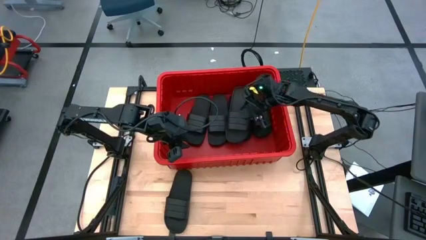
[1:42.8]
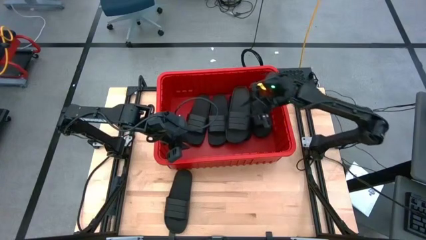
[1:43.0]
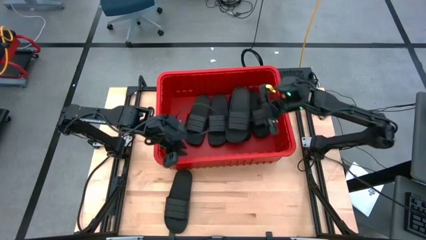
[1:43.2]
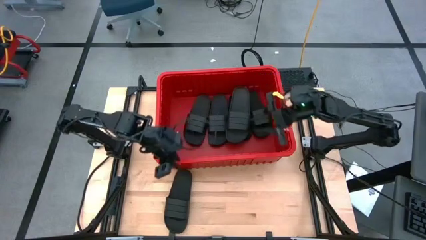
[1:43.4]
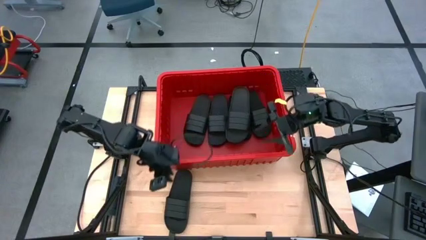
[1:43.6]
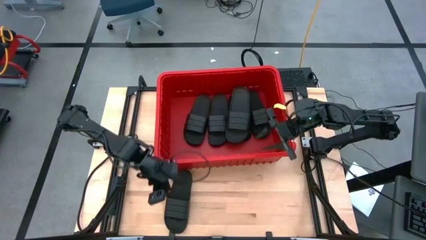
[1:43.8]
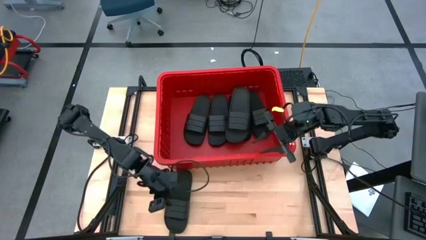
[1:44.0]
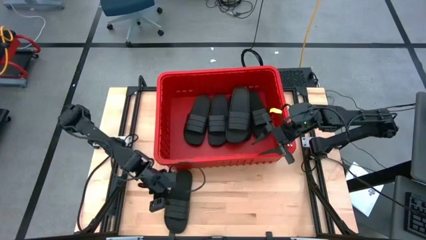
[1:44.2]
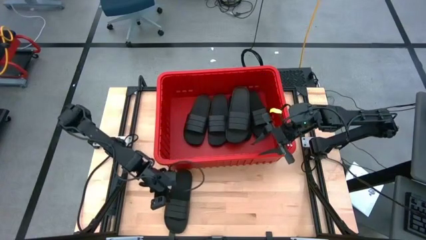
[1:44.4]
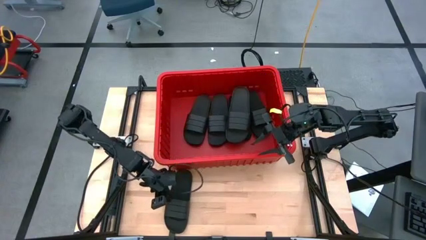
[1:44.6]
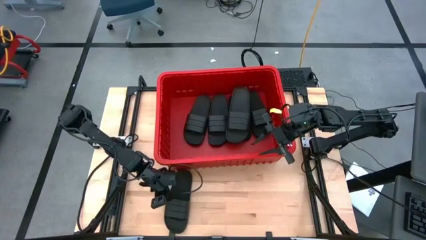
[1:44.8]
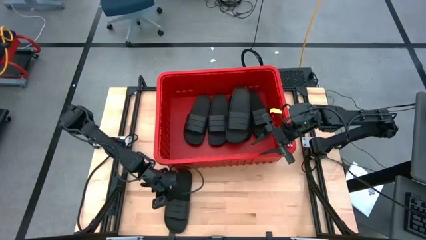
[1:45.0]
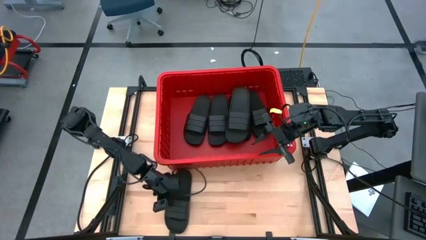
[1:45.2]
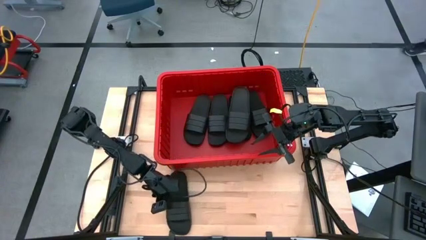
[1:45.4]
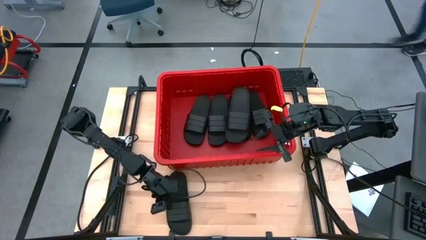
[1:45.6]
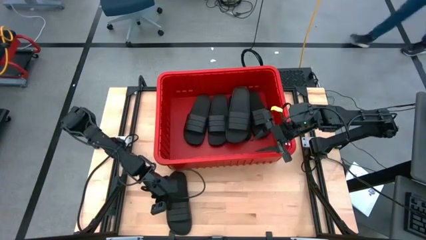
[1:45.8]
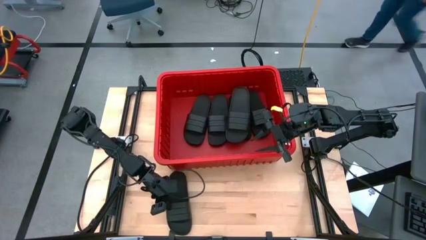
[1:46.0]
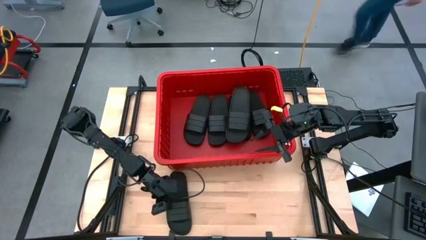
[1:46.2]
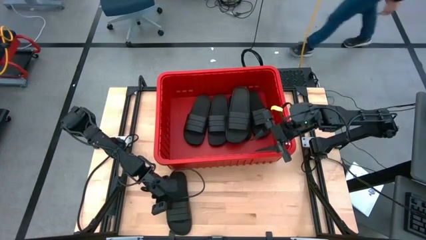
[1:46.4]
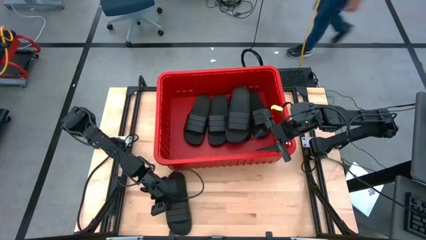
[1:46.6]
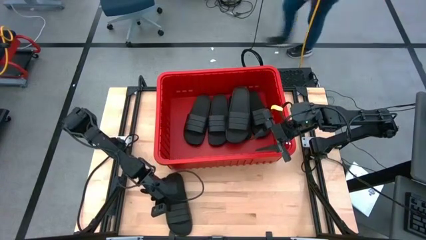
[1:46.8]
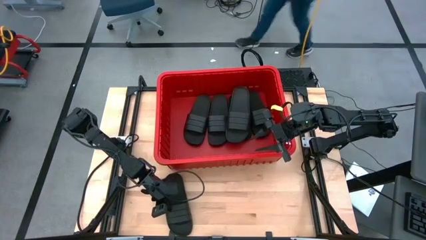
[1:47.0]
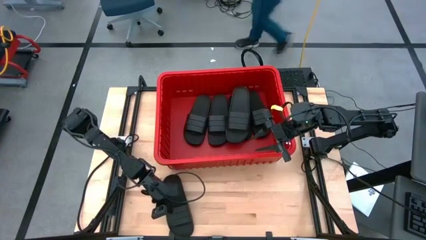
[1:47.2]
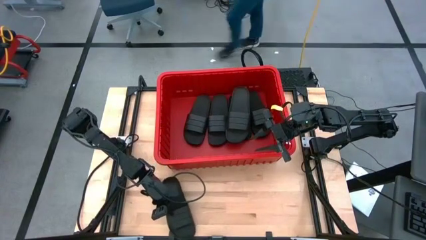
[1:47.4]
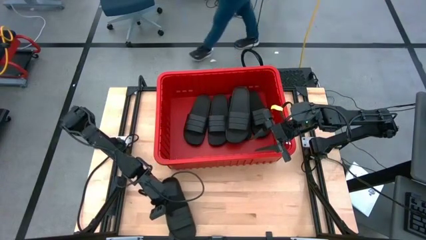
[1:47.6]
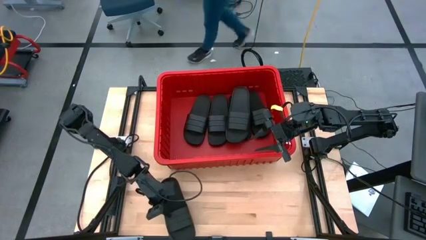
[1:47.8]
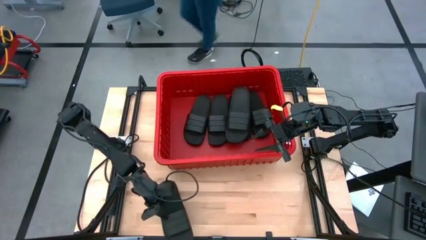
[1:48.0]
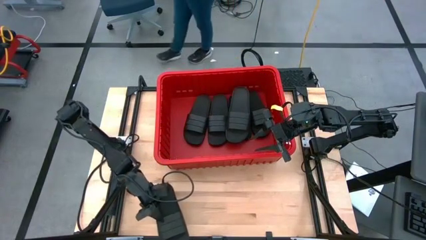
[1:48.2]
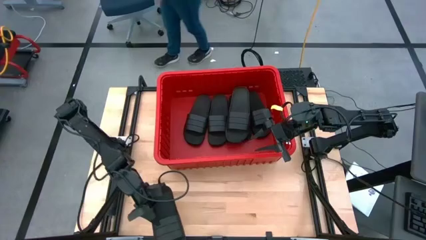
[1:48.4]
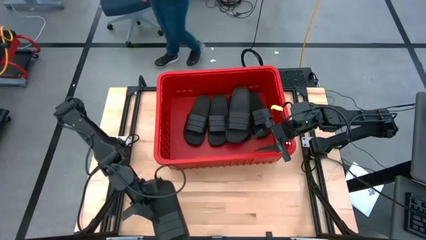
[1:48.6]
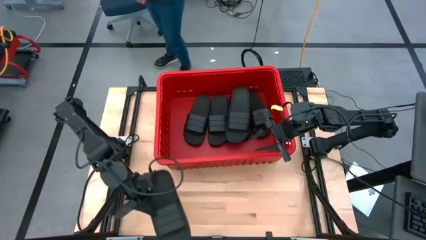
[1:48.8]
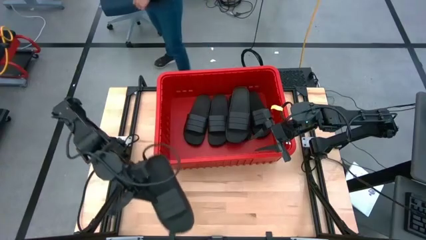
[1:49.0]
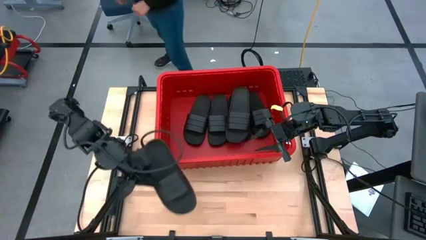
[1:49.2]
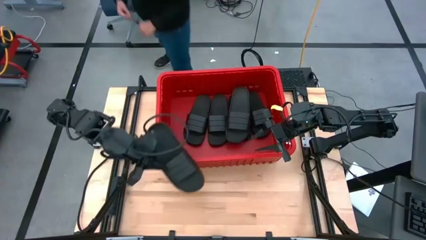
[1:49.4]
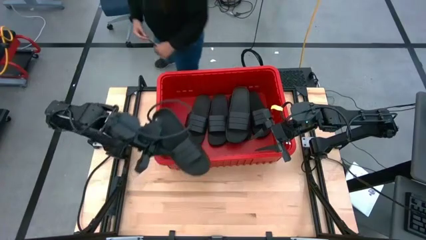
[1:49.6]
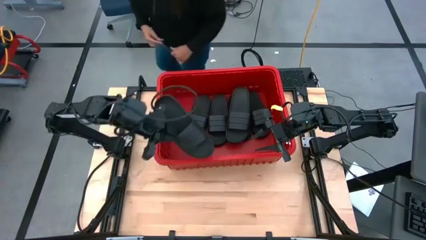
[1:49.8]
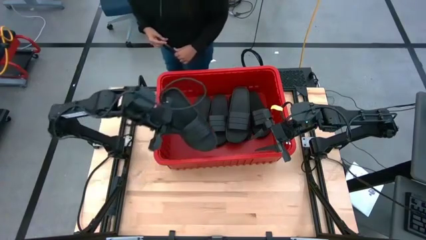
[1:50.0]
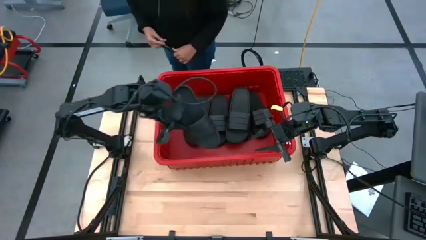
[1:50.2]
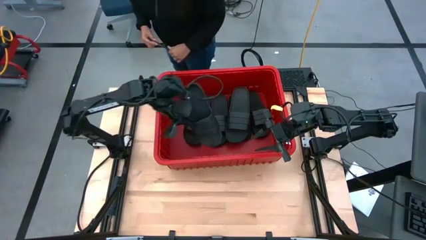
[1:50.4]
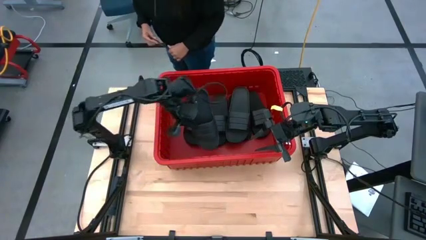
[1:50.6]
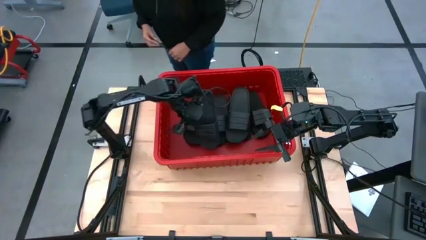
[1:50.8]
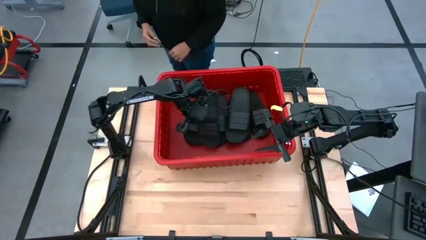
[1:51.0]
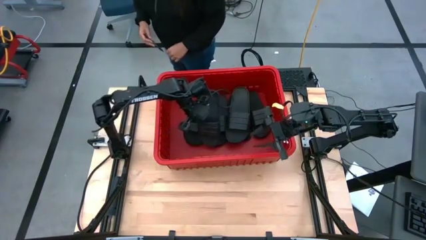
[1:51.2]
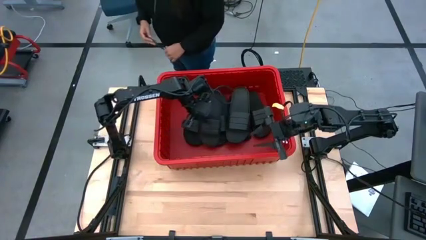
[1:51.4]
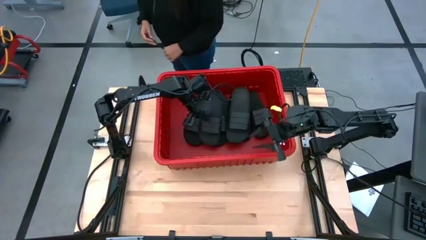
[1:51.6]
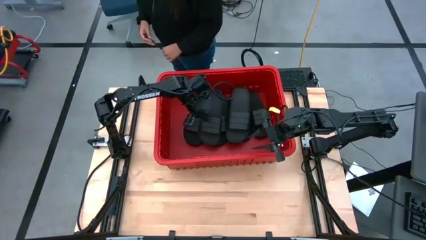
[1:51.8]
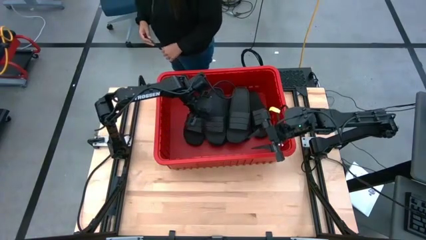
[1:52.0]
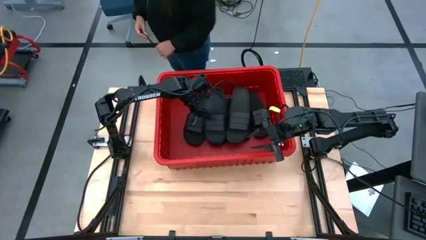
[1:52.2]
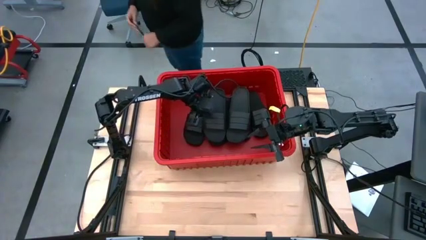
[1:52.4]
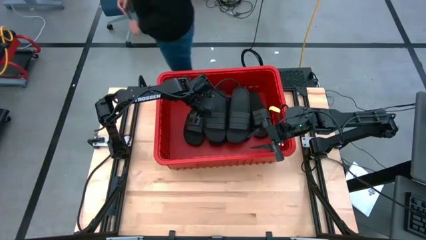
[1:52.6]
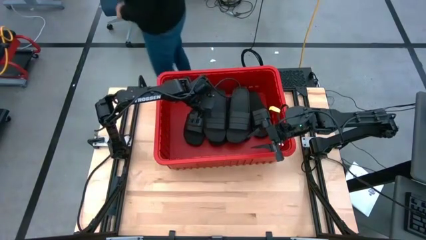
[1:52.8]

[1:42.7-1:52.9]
Task: Pick and place slides into bin
Put the black slide into the red bin
